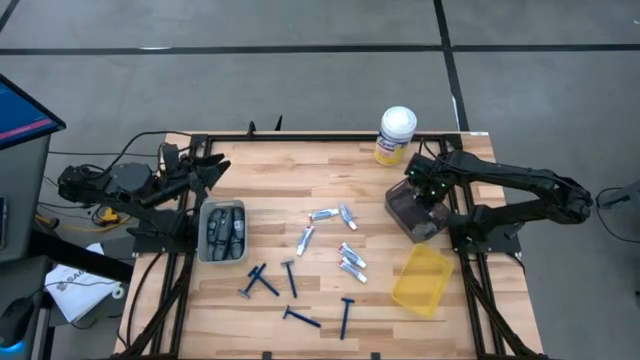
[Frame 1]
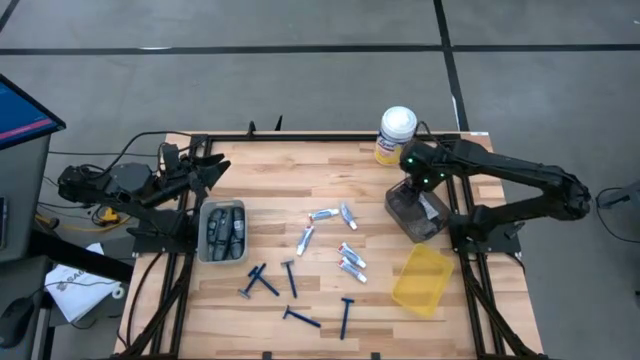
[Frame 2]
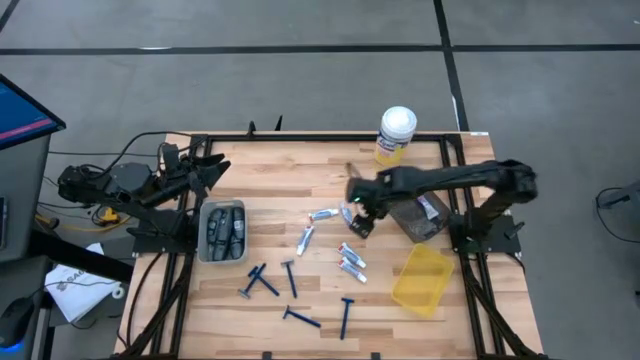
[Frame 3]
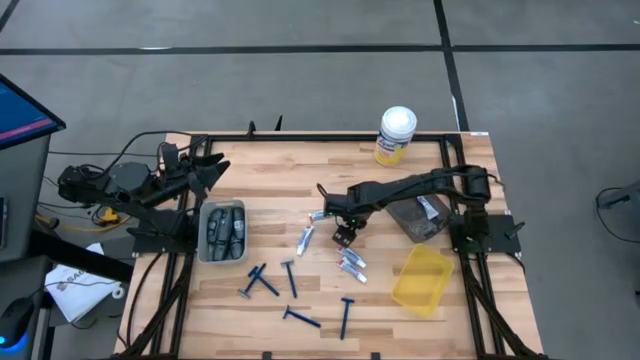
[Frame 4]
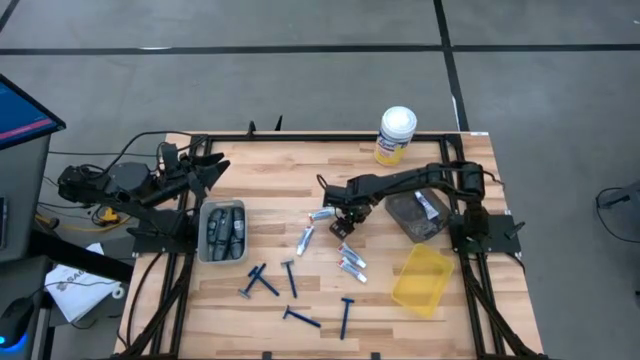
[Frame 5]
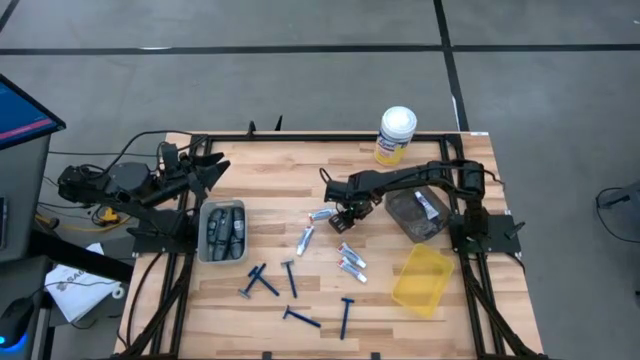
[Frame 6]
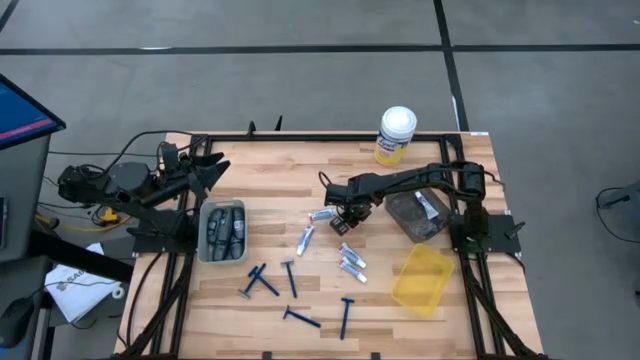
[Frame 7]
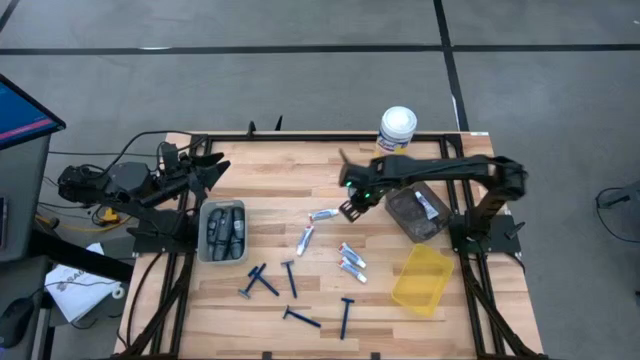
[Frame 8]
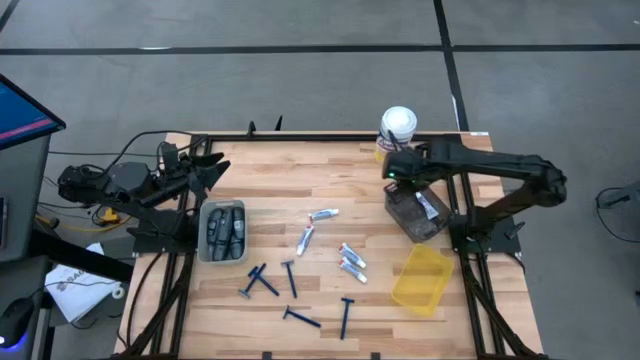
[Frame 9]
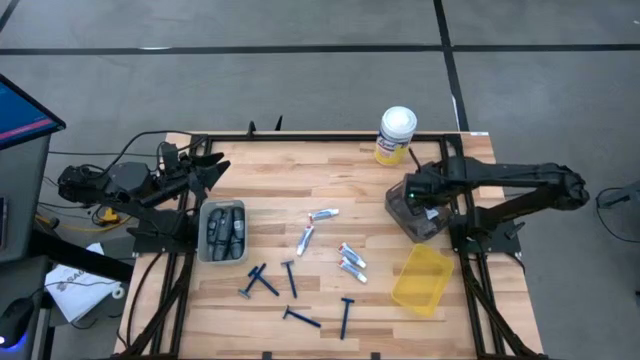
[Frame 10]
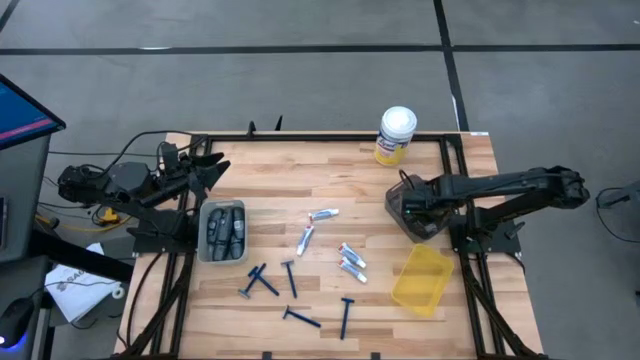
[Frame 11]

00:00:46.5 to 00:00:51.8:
Task: Pick & Place Travel size toiletries
Put the white toothpaste into the black bin

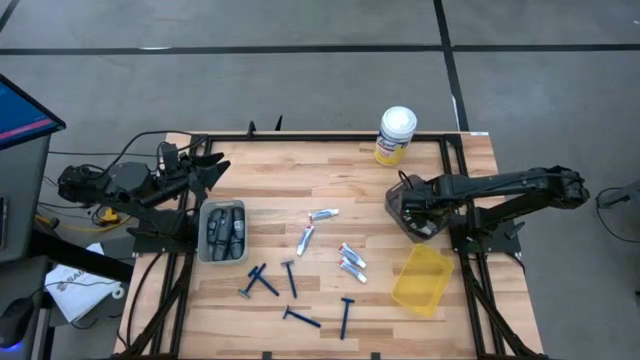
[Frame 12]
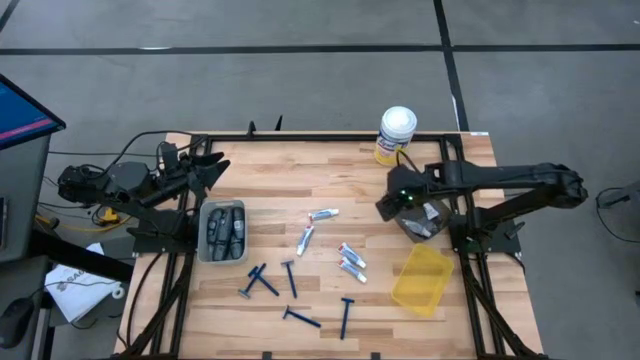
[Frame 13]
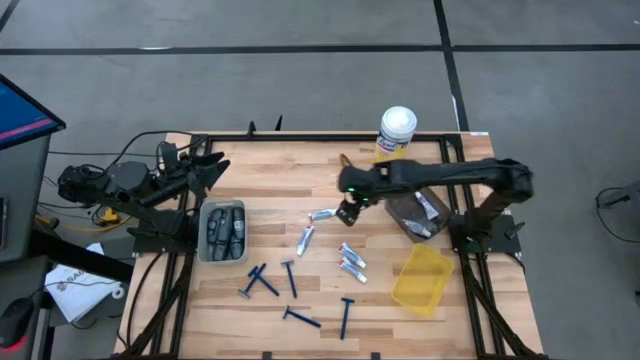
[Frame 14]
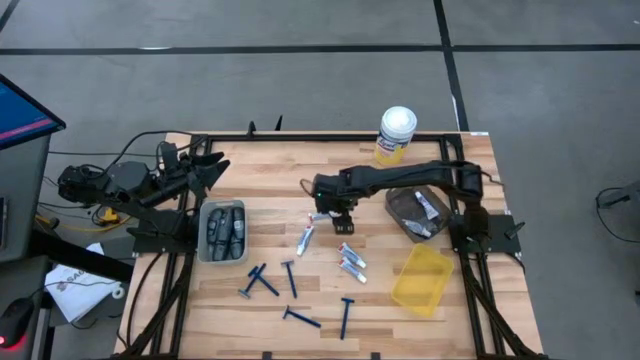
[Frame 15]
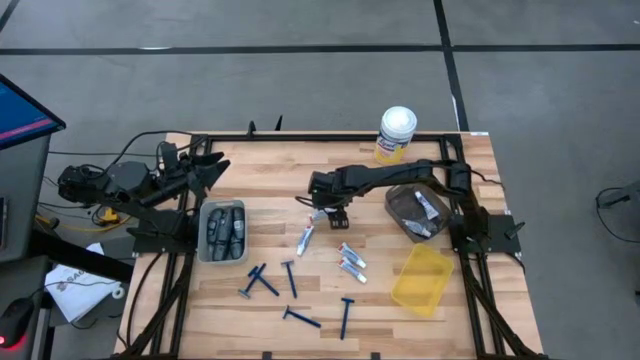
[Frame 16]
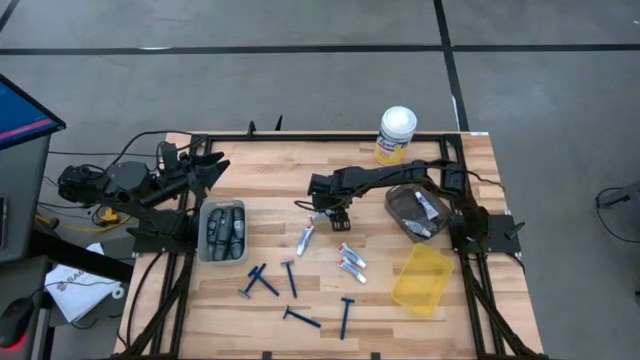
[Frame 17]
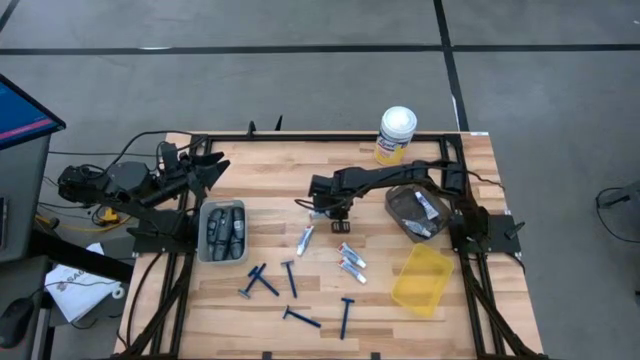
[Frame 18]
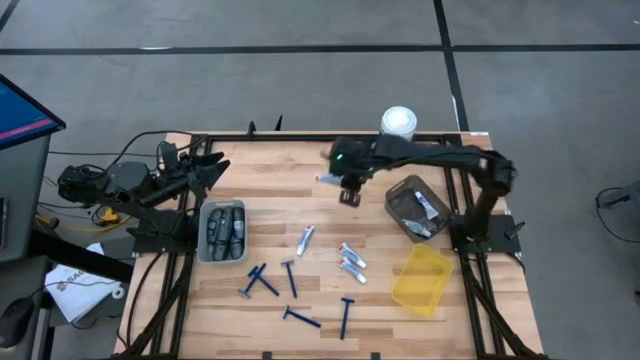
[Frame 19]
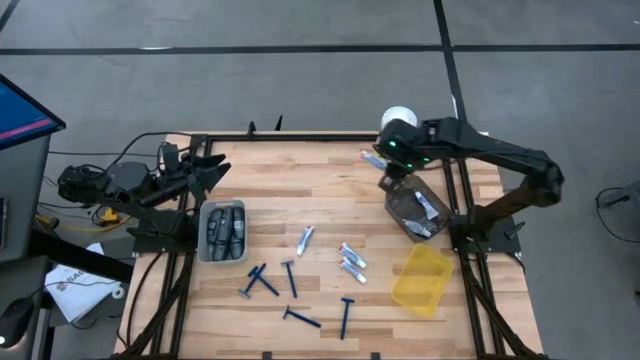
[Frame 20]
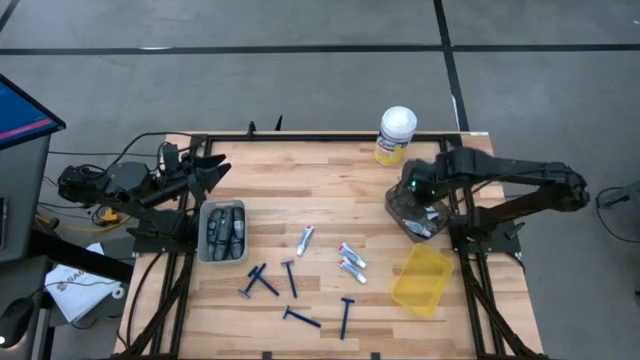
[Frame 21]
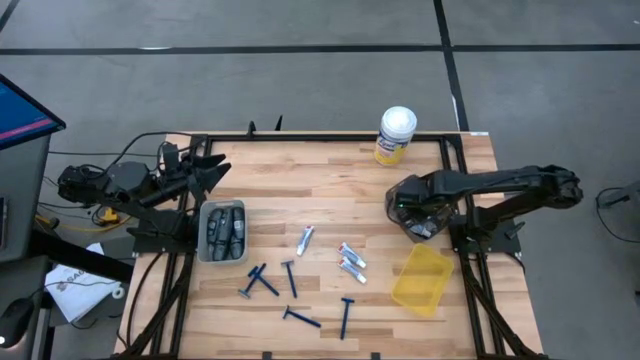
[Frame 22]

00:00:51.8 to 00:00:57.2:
Put the white toothpaste into the black bin

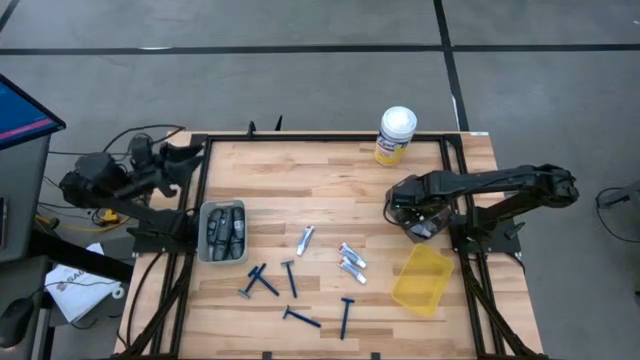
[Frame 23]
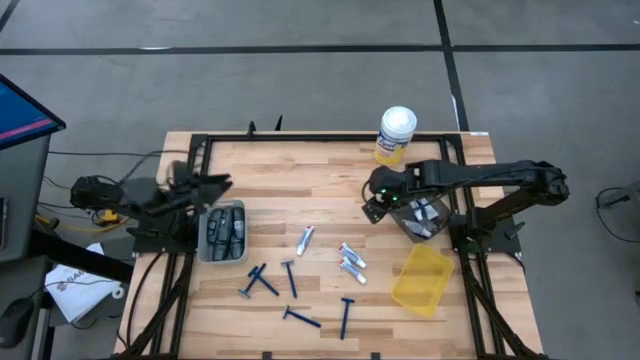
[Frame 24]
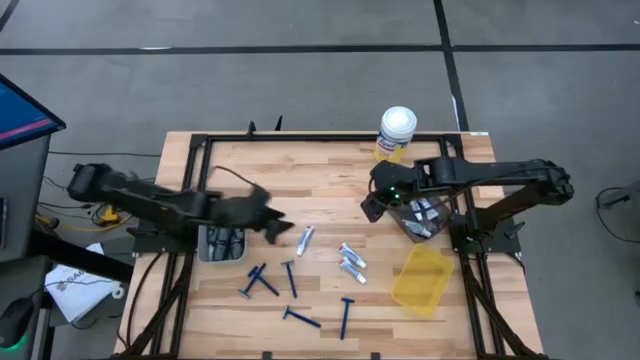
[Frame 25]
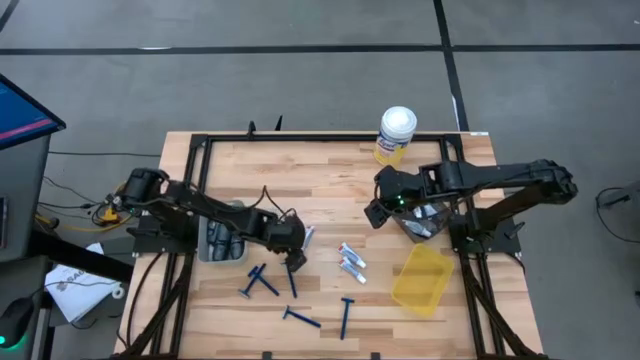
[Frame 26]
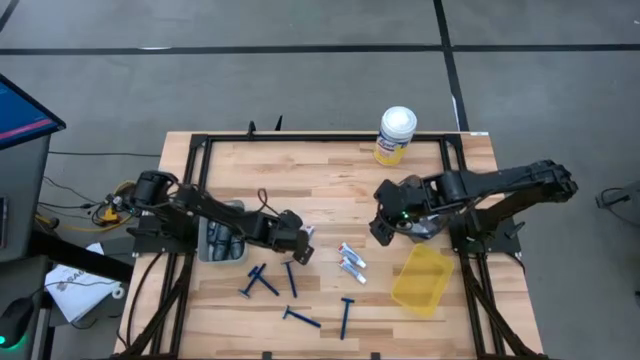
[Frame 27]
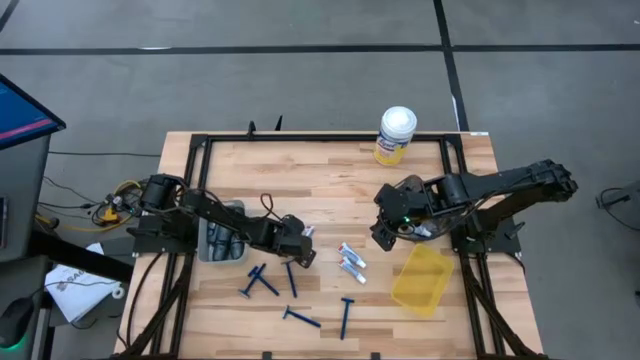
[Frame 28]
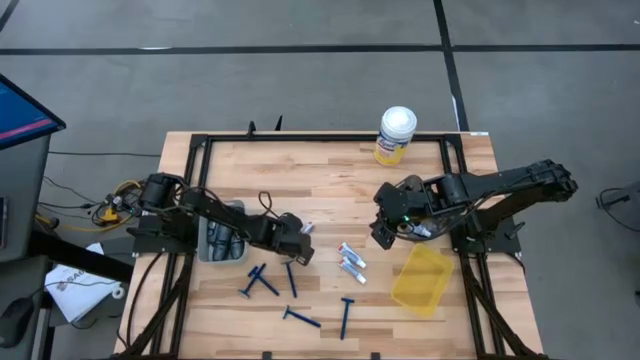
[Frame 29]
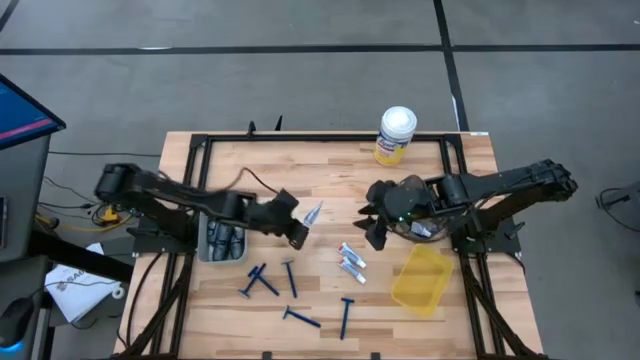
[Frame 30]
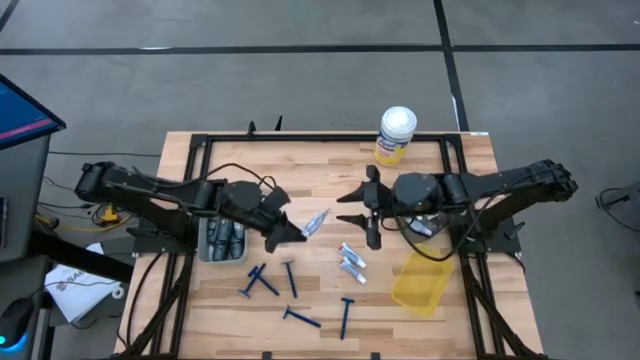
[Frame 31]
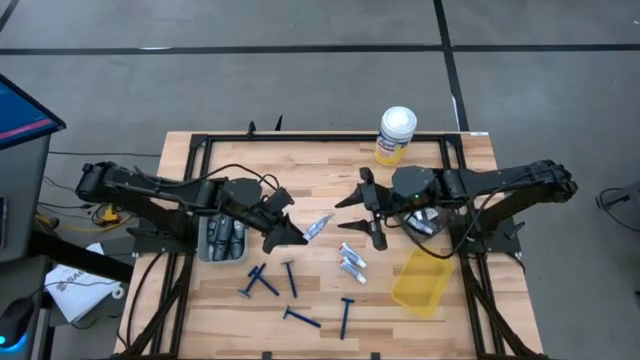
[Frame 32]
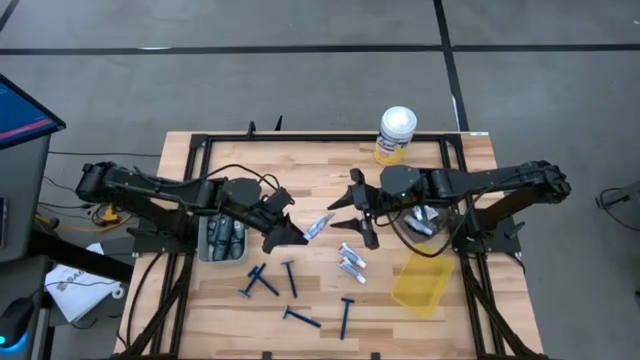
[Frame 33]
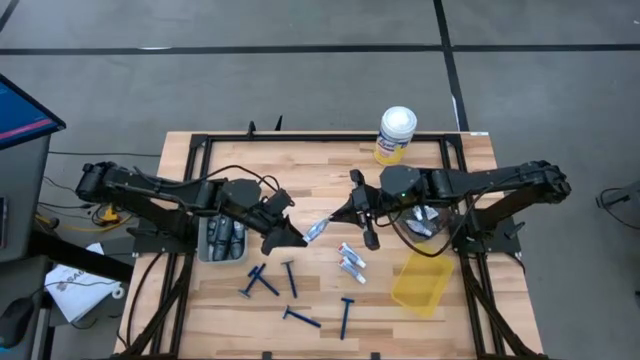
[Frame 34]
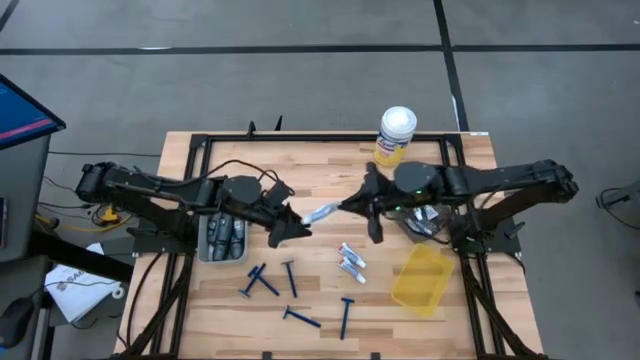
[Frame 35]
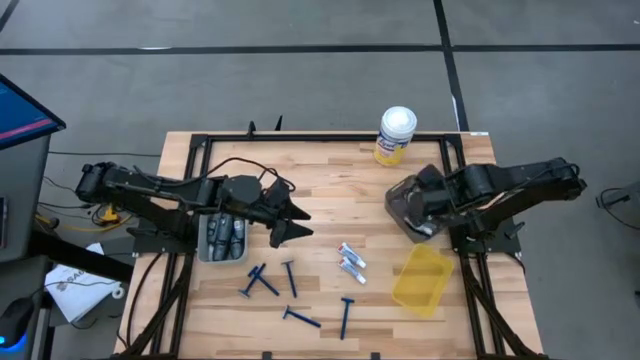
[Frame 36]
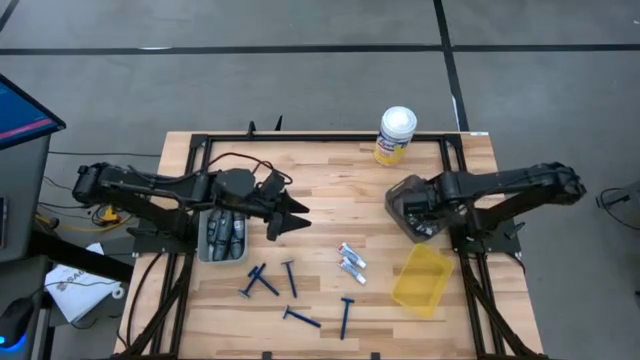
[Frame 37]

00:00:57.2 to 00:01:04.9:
Put the white toothpaste into the black bin

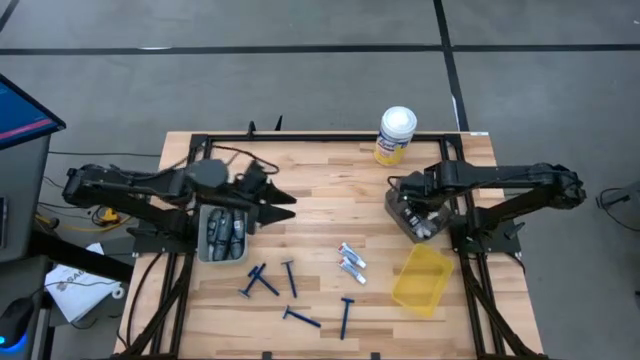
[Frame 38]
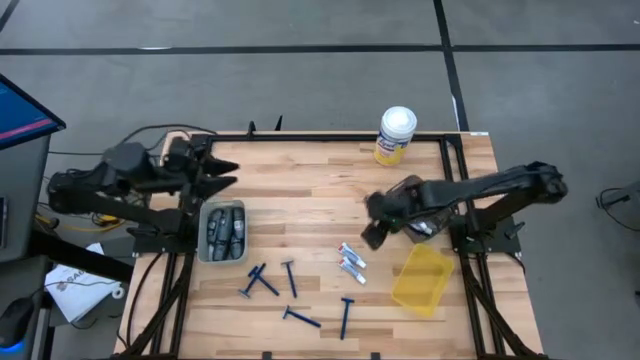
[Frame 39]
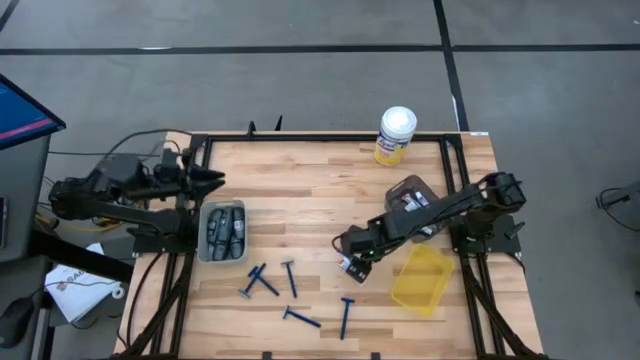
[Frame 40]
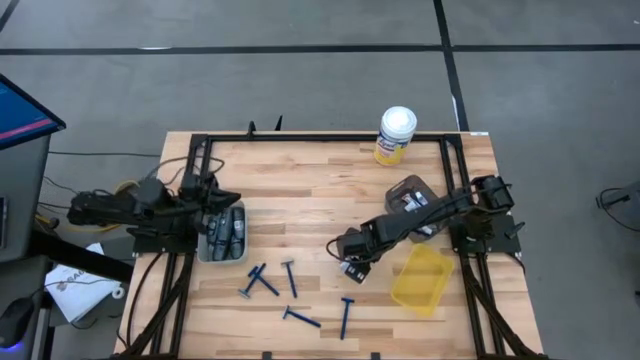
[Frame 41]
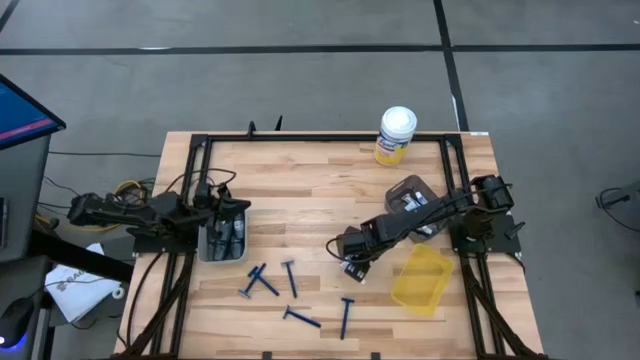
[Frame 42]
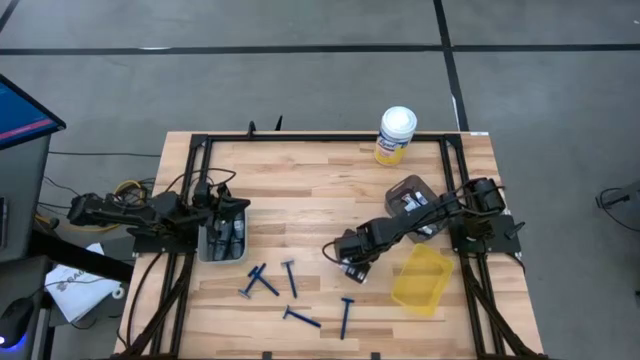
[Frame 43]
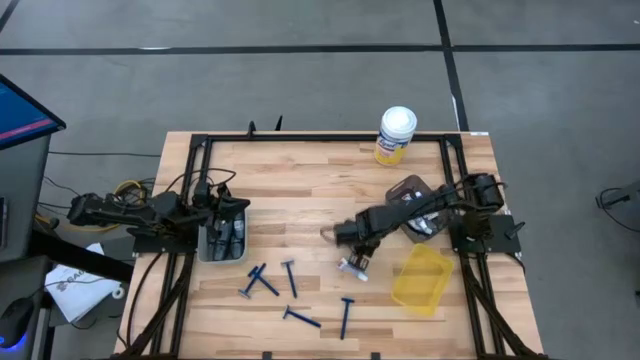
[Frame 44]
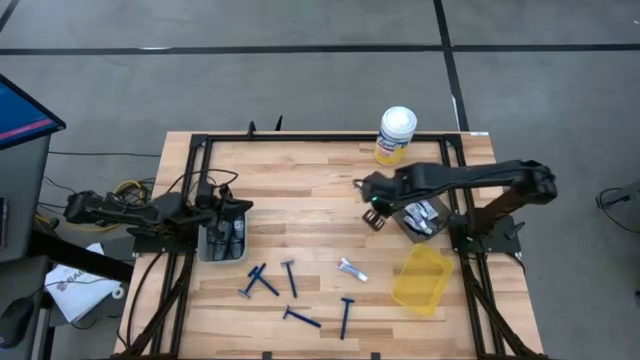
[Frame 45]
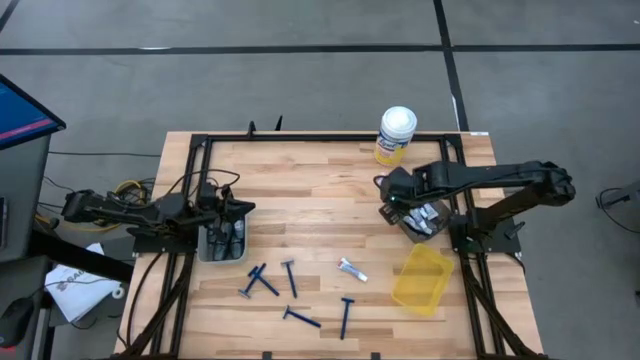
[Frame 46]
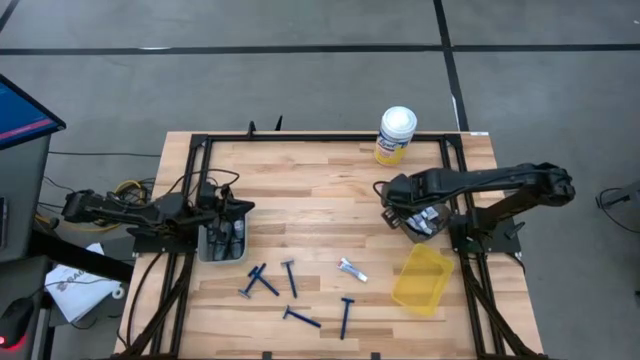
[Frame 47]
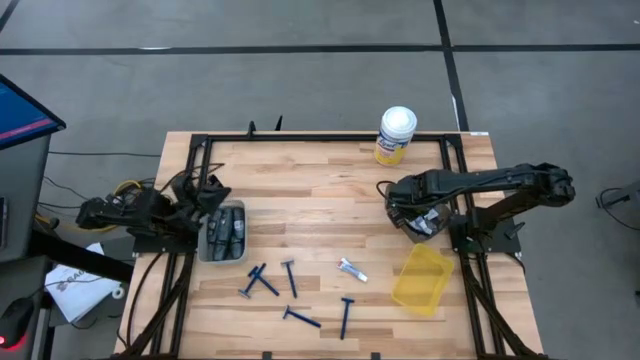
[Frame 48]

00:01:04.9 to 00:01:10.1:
Put the white toothpaste into the black bin
